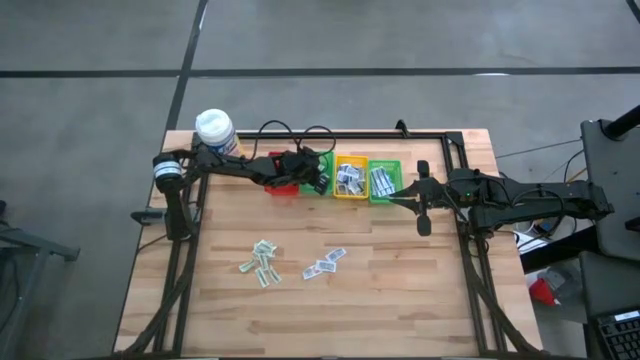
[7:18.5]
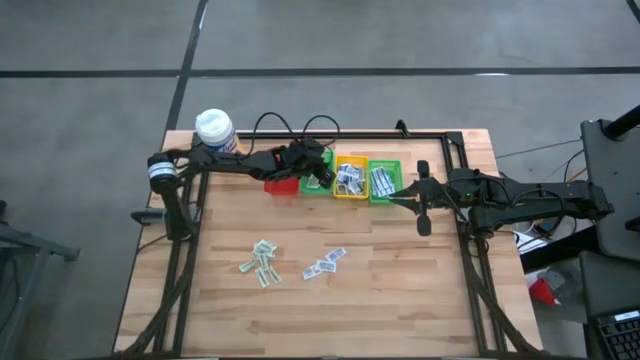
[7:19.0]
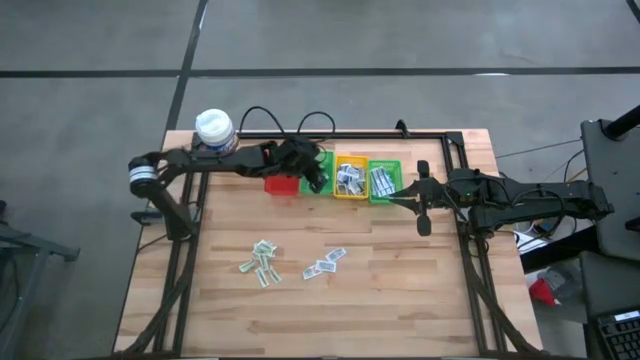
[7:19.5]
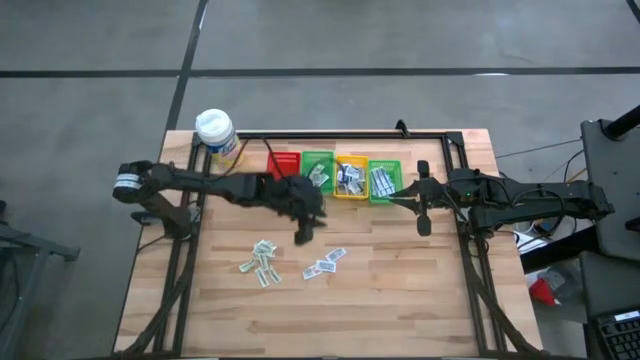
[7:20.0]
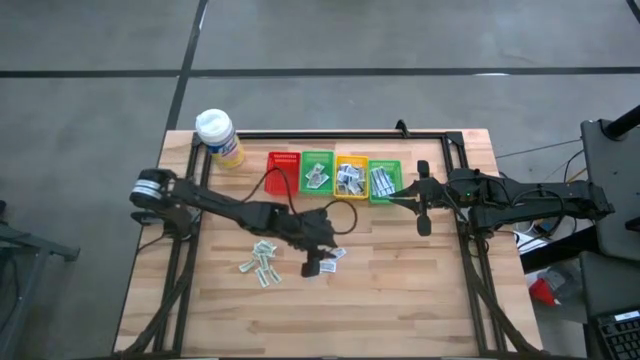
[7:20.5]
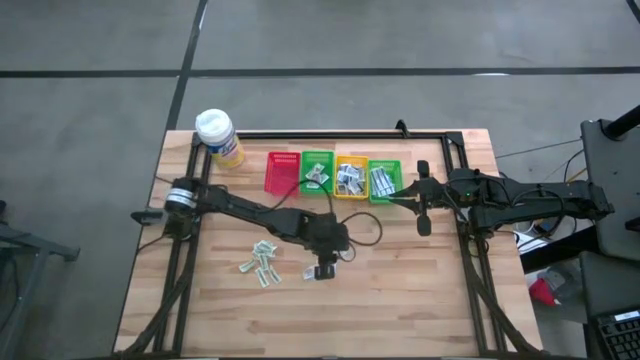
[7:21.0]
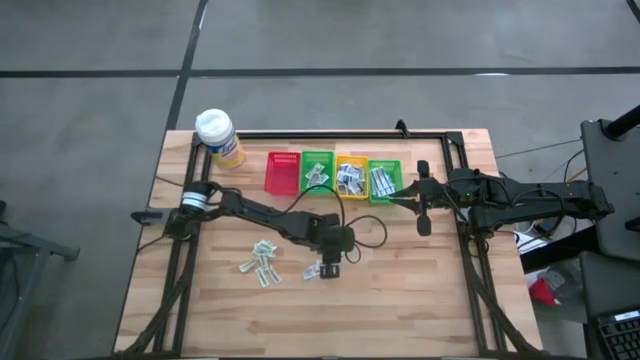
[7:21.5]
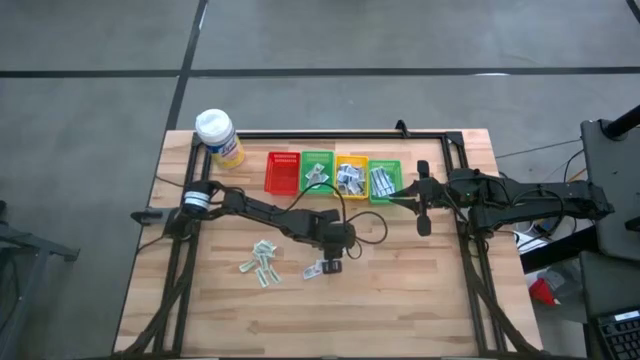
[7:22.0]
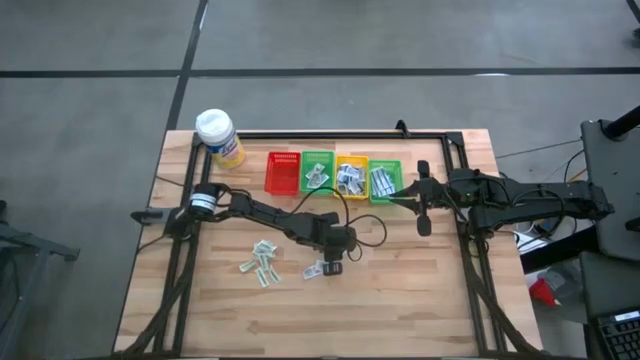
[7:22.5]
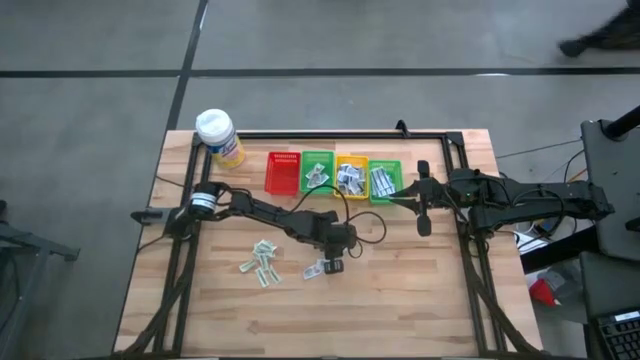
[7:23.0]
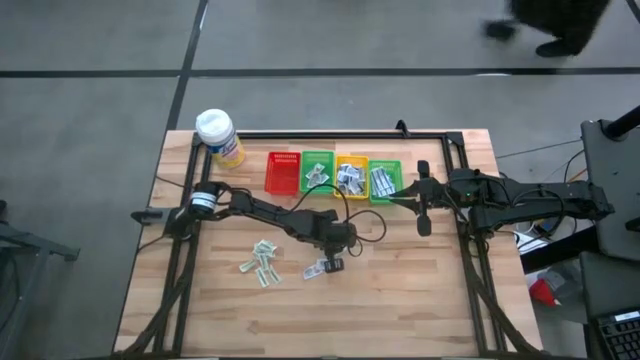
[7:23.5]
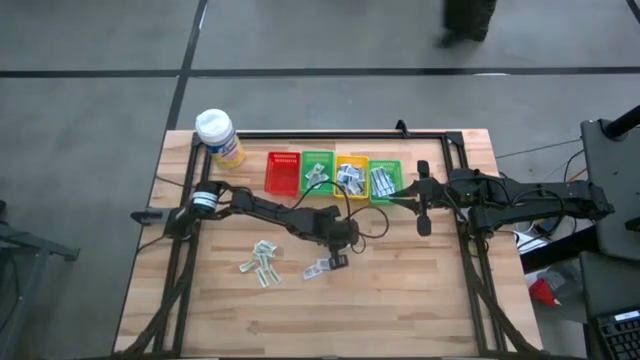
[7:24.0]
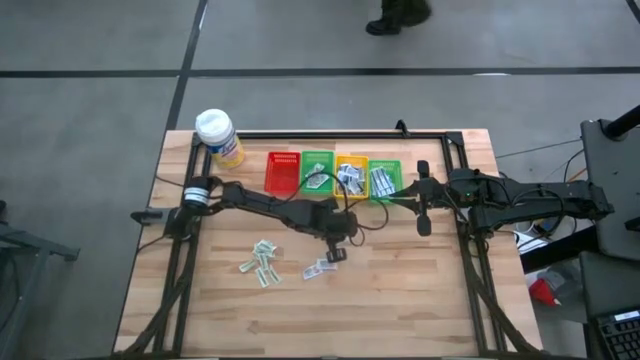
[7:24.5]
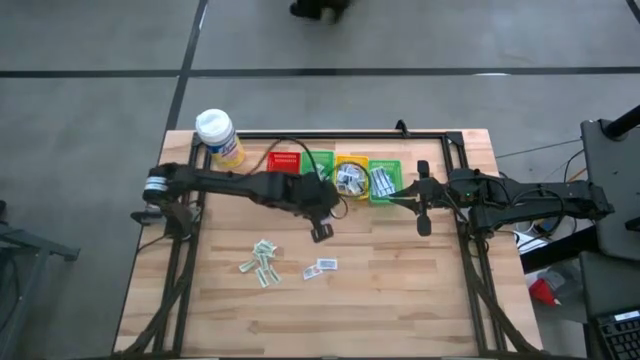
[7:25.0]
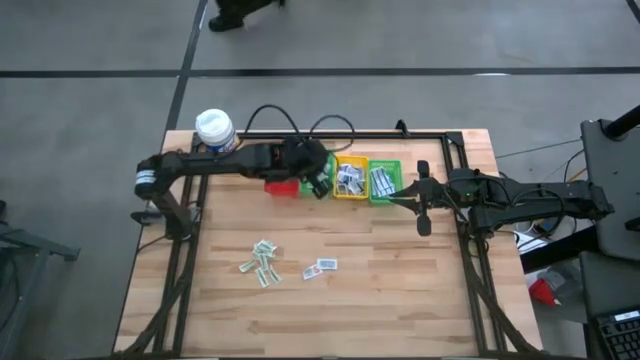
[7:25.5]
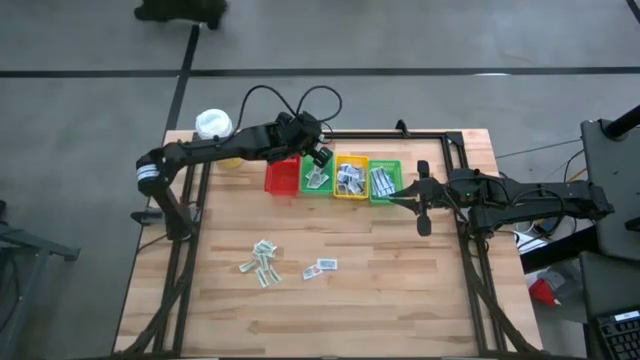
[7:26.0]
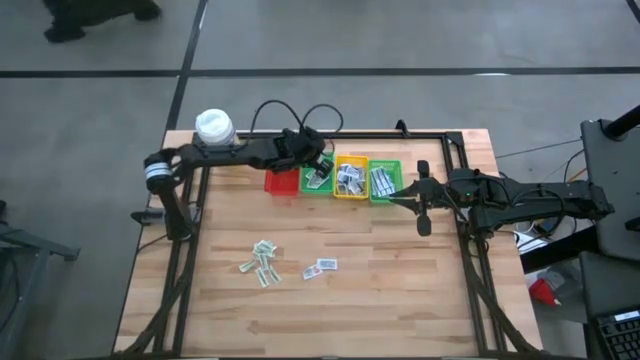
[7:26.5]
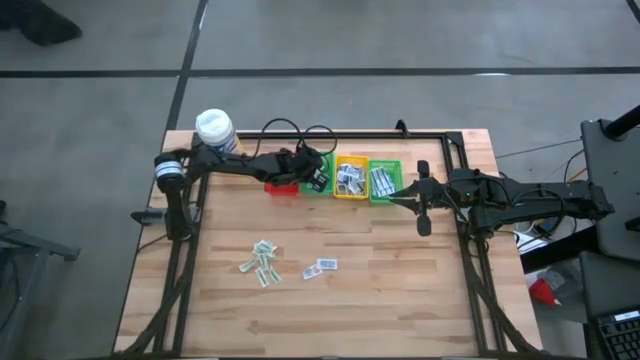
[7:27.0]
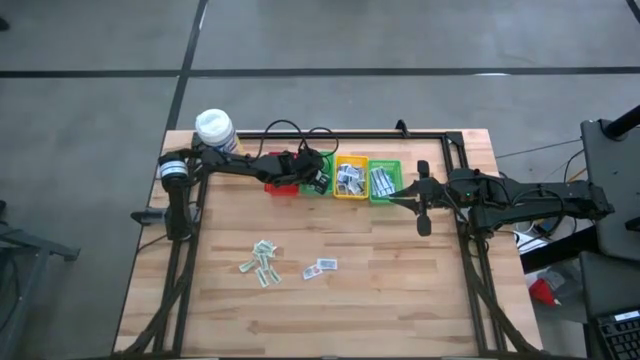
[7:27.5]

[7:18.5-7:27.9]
Task: Pick & Place First Aid Supplies
Put the orange ointment pack into the left green bin

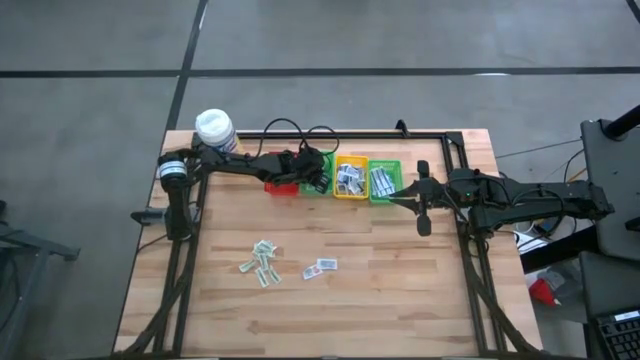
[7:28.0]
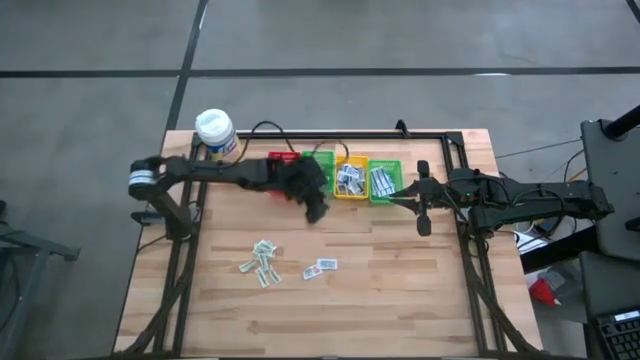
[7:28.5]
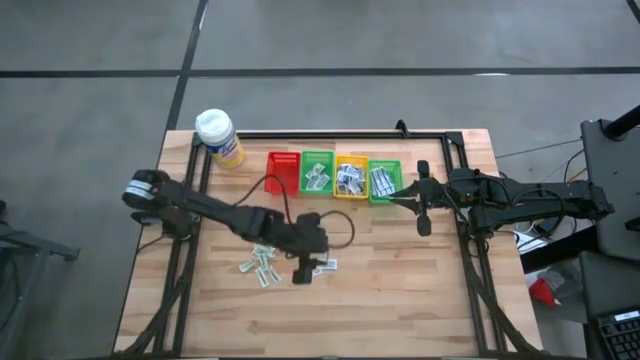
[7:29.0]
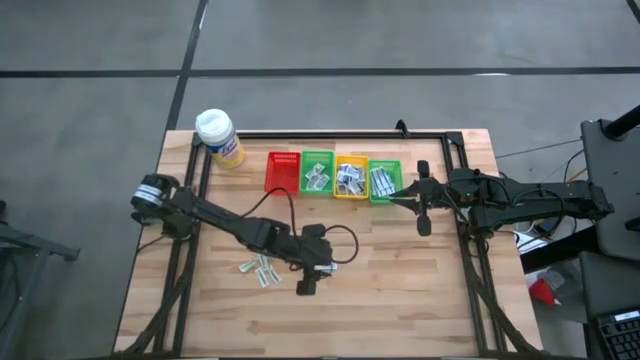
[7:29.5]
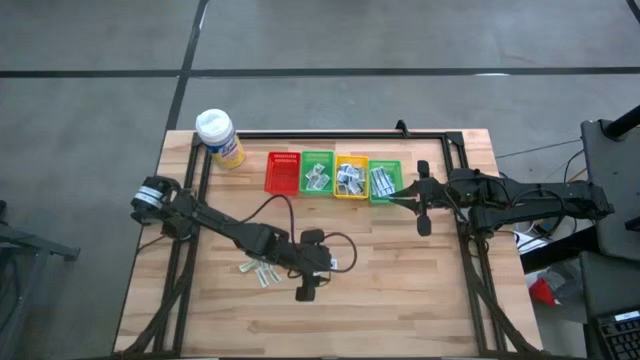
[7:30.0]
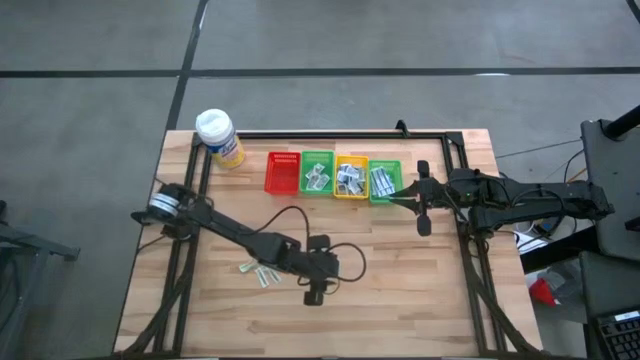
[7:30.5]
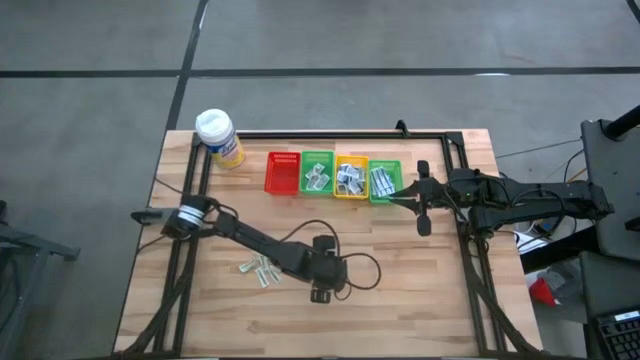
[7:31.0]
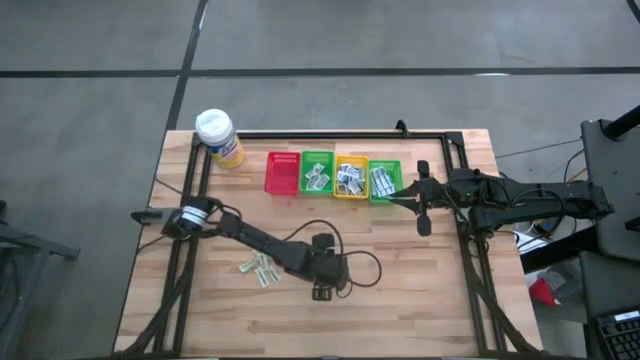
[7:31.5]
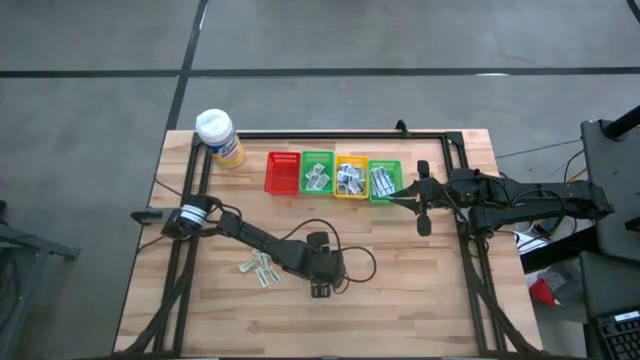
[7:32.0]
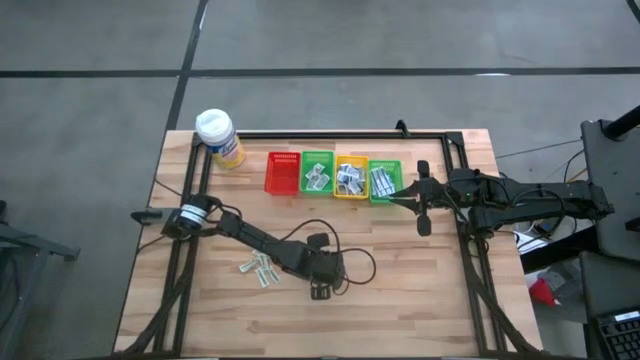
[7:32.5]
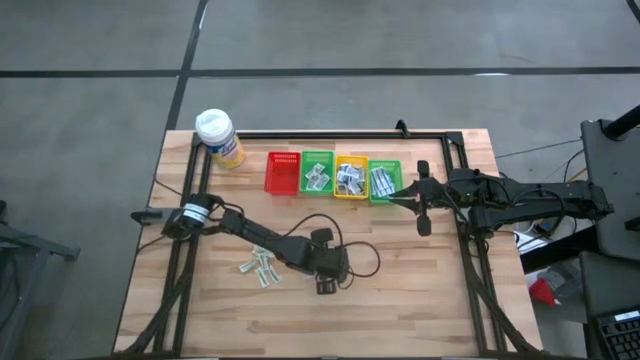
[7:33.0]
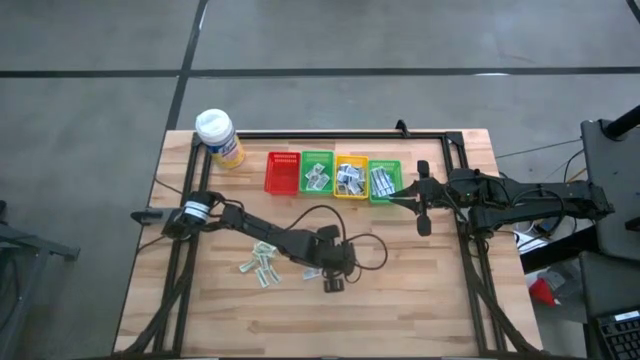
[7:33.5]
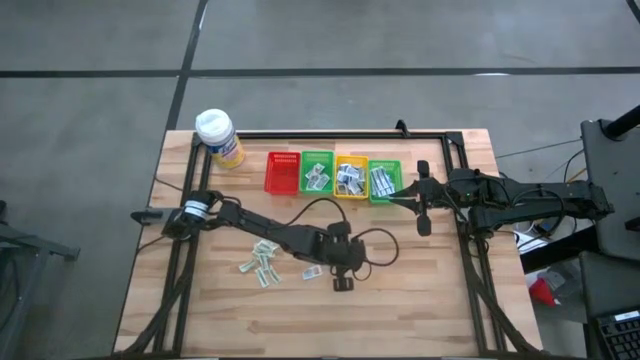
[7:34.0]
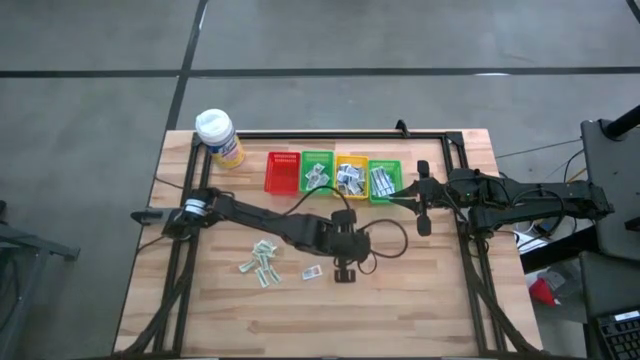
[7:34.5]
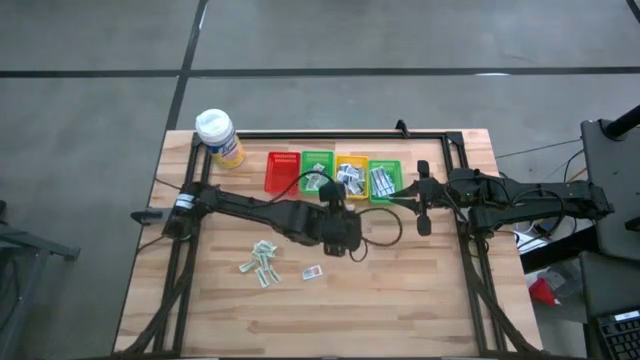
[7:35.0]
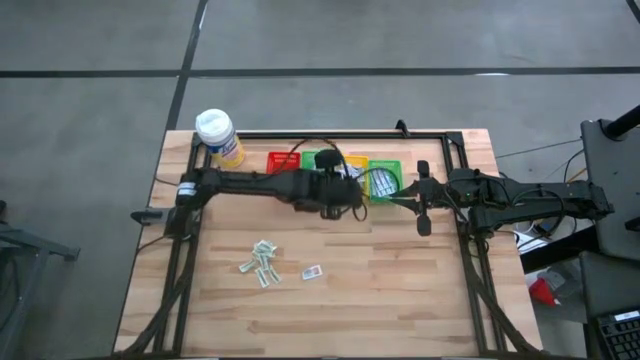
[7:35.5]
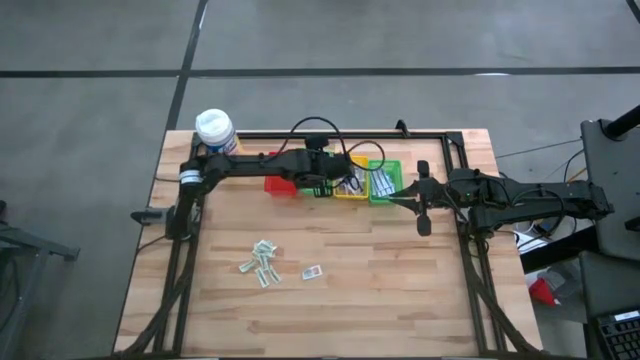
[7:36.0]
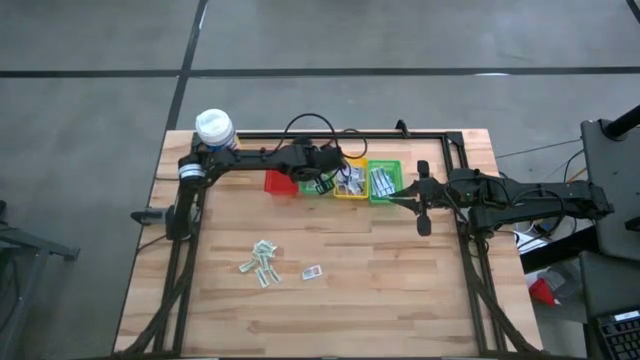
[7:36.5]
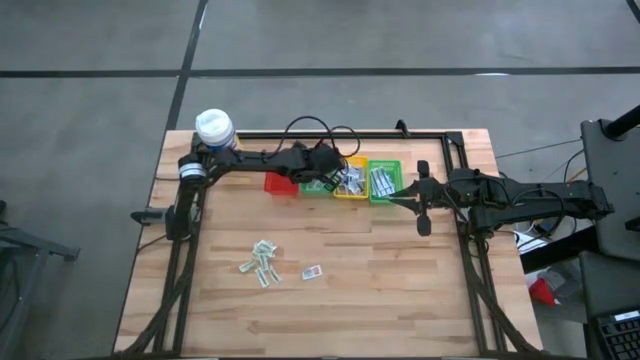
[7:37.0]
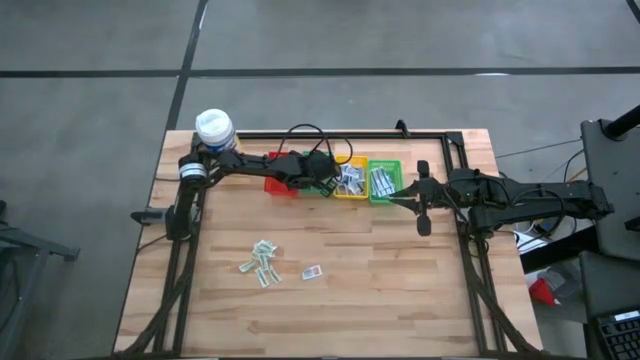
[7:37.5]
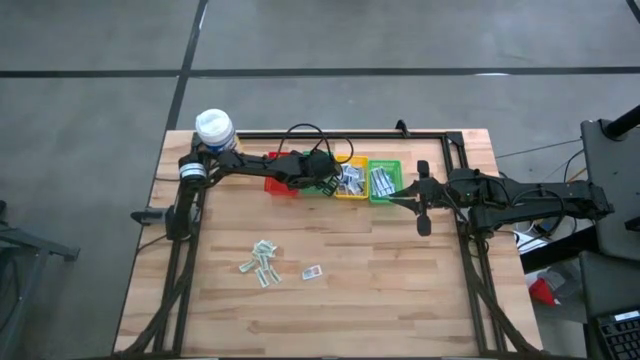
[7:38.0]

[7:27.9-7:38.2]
Put the orange ointment pack into the left green bin
